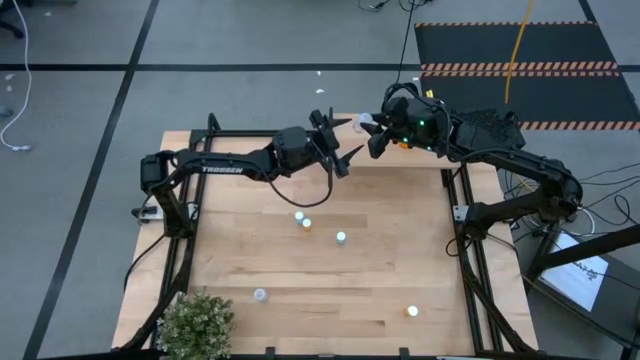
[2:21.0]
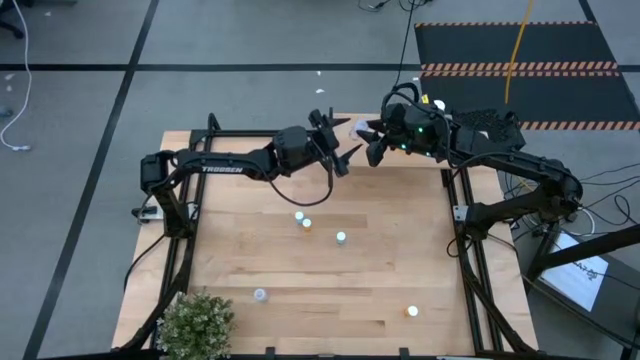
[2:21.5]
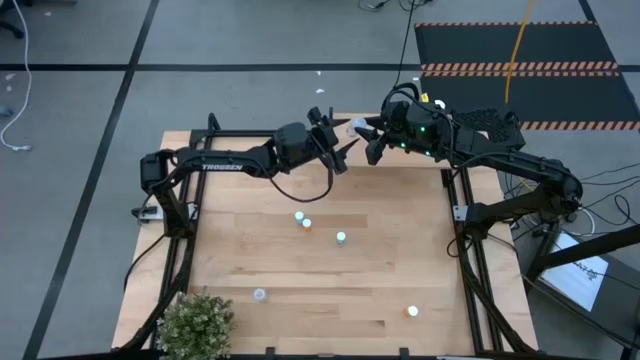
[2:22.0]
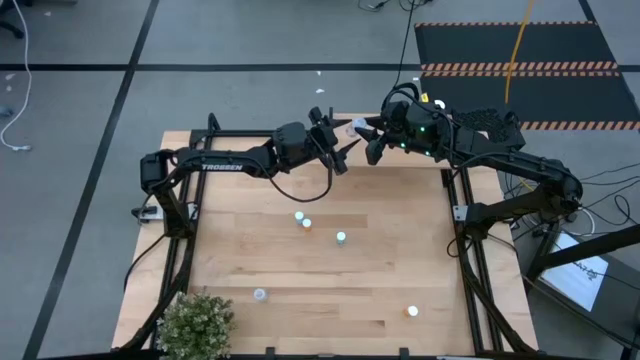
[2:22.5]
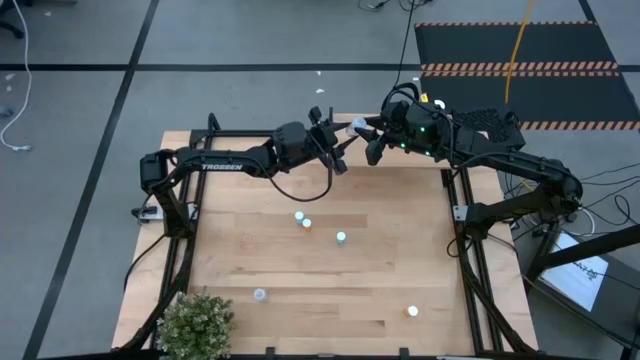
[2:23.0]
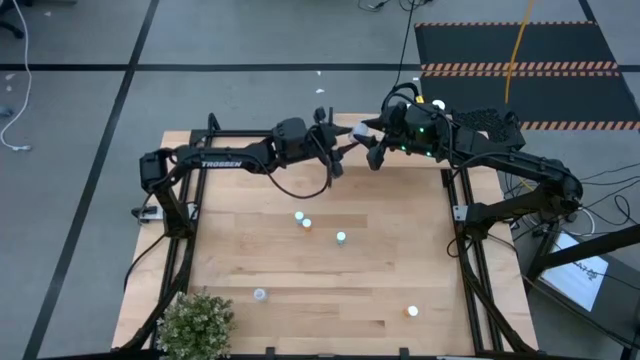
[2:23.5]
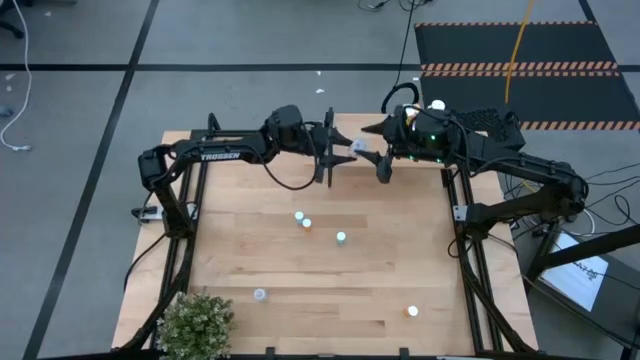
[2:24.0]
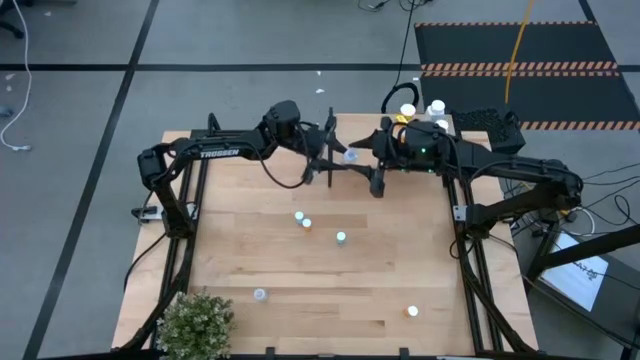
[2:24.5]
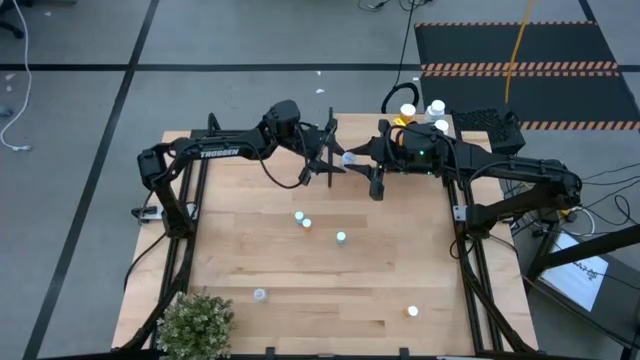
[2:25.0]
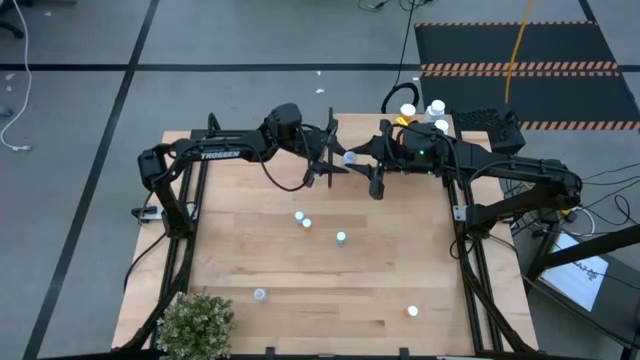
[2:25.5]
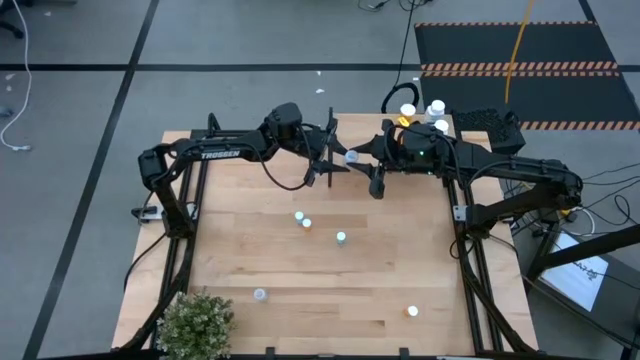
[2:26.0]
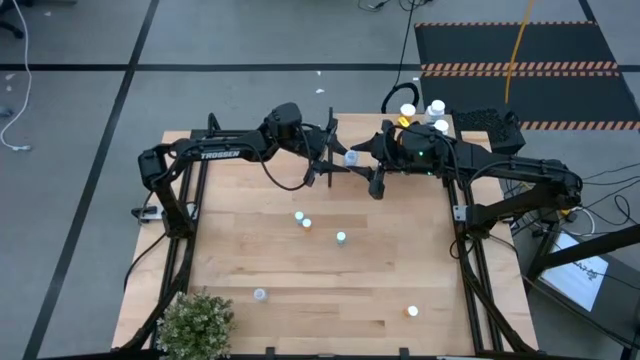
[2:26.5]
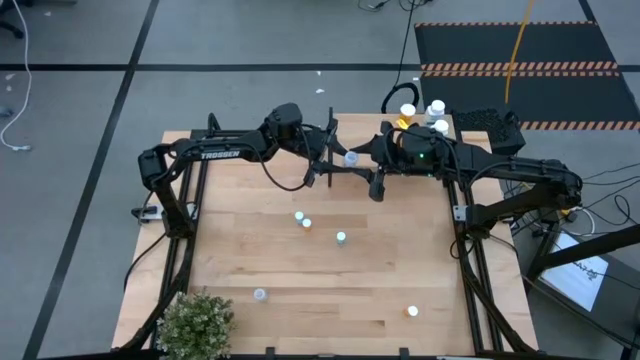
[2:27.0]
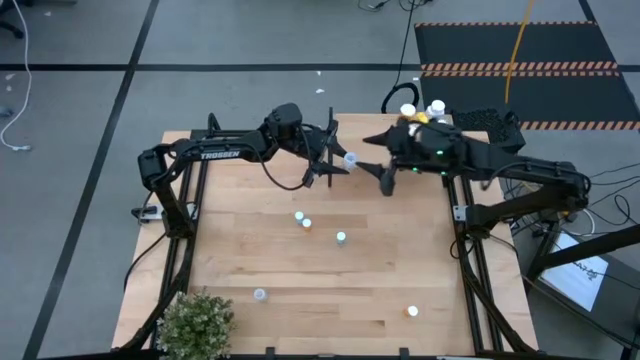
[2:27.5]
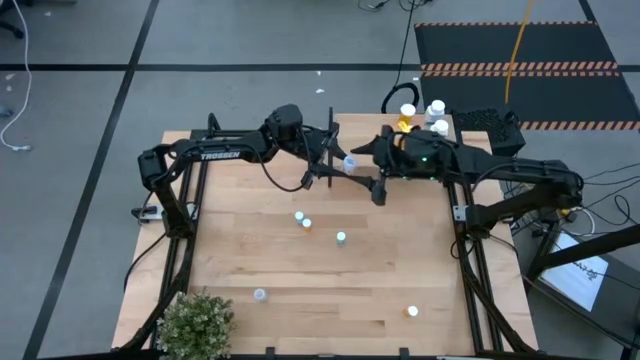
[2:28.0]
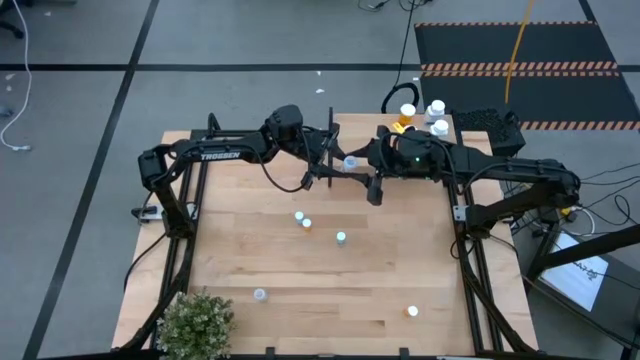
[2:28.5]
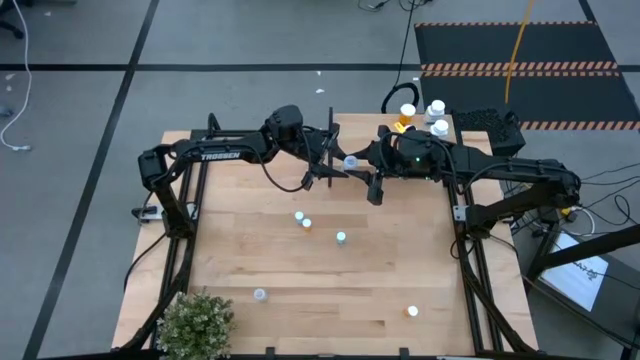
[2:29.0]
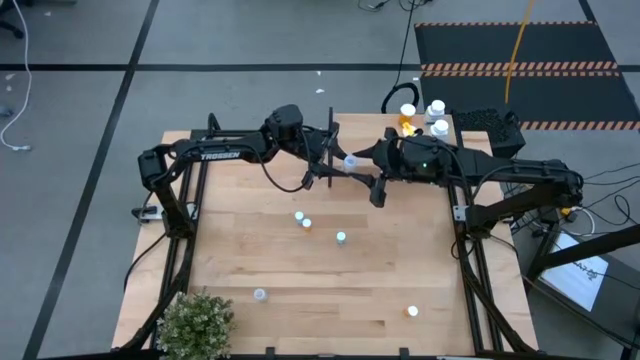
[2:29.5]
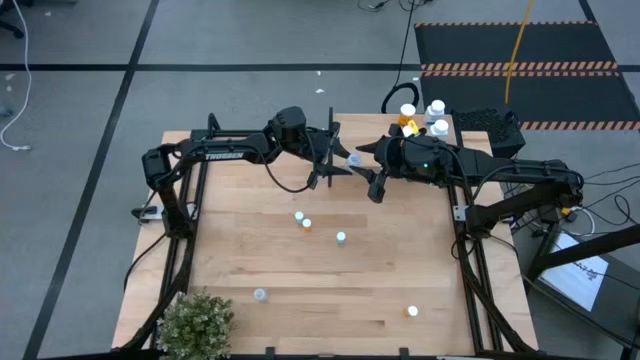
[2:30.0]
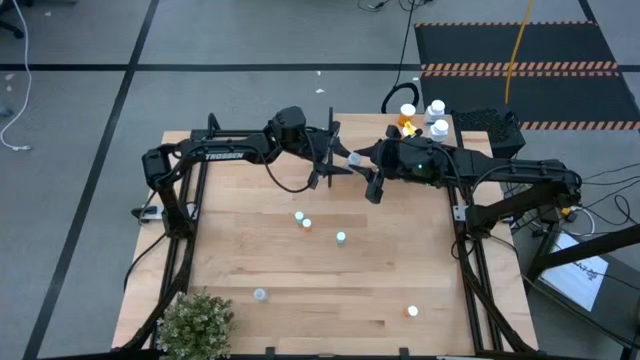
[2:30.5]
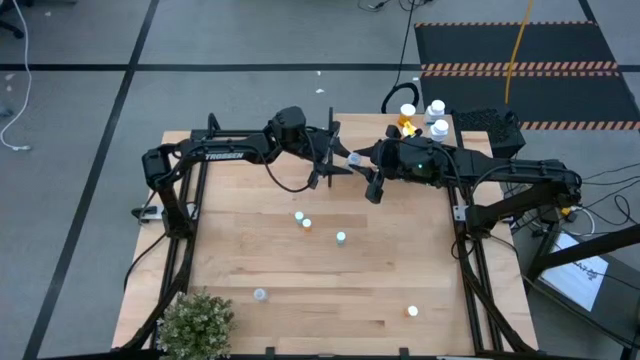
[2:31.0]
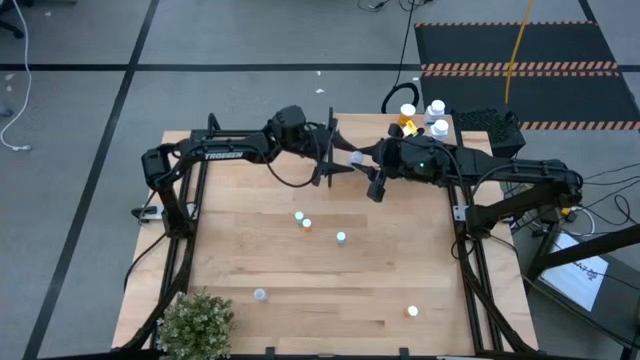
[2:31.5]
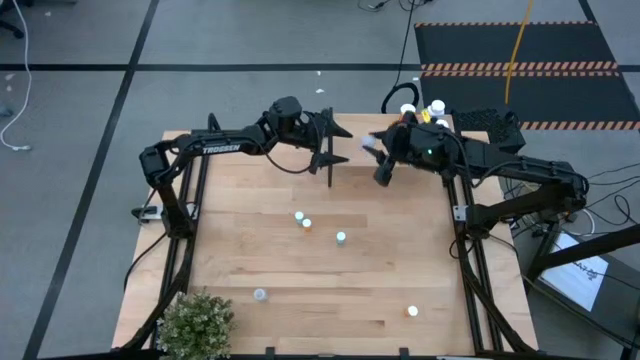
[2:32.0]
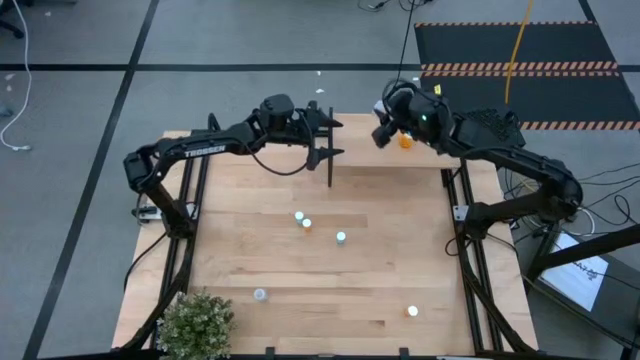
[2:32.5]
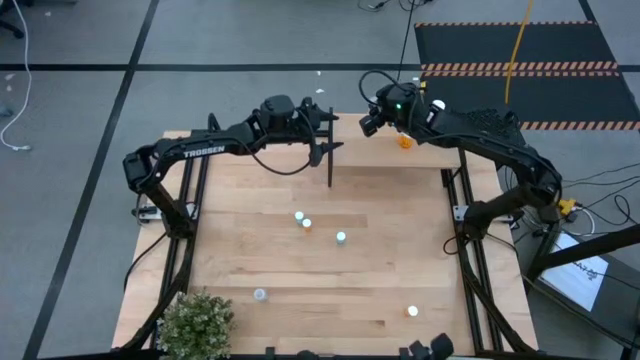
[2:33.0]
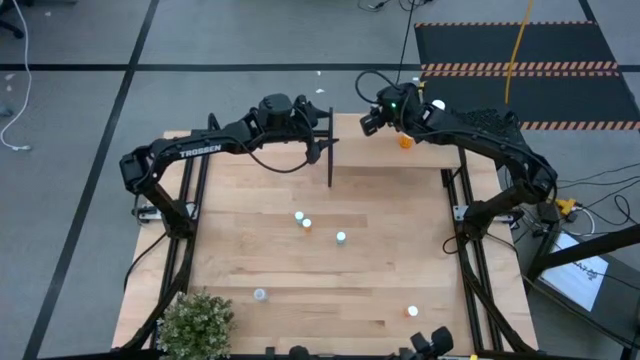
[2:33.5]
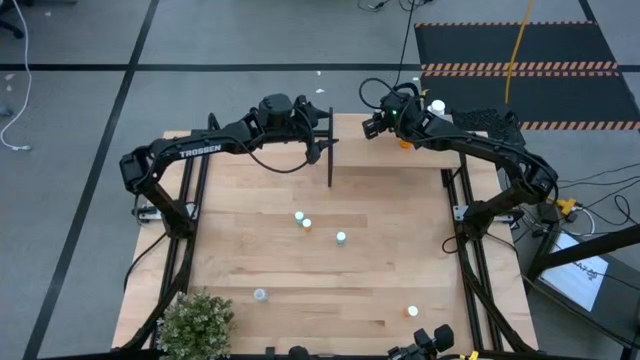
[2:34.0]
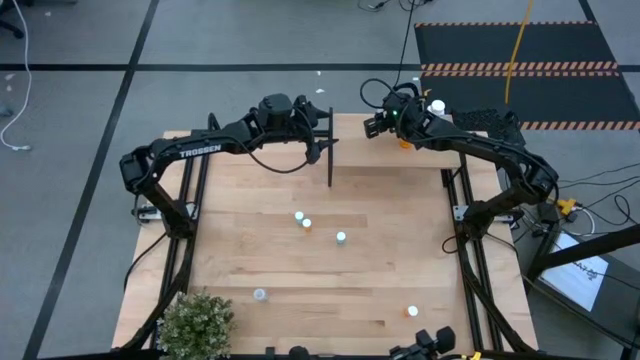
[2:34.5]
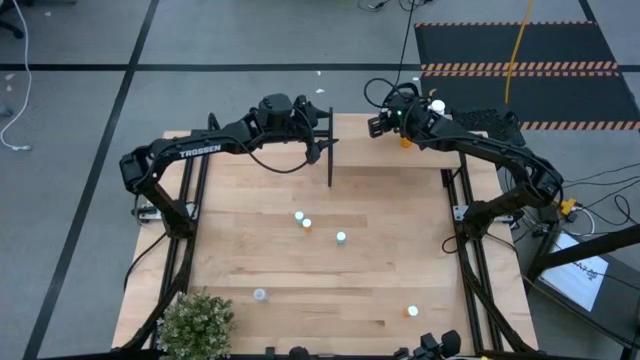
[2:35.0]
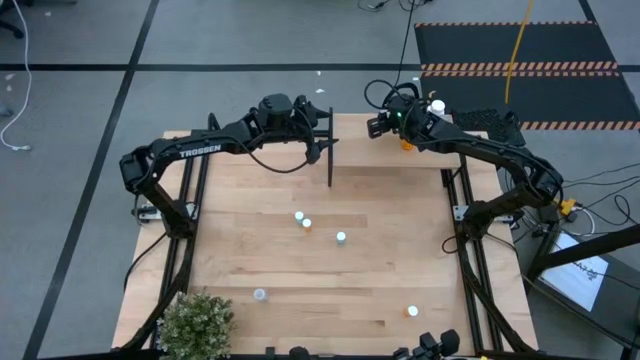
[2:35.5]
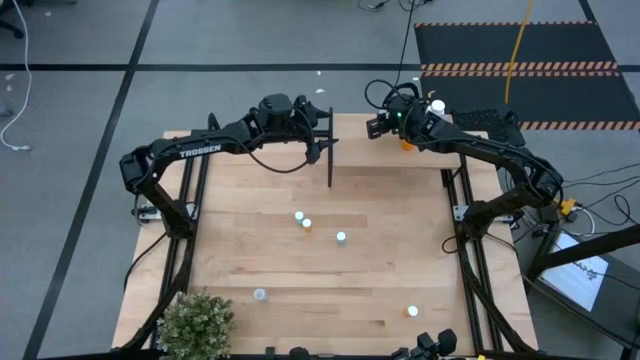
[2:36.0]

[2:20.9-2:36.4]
Task: Pick and place medicine bottles onto shelf by color
Put the top transparent pill bottle on the shelf

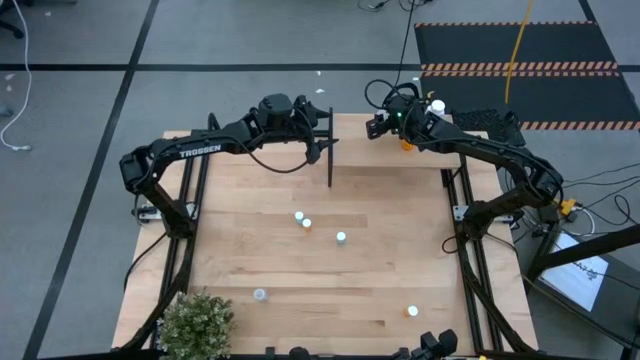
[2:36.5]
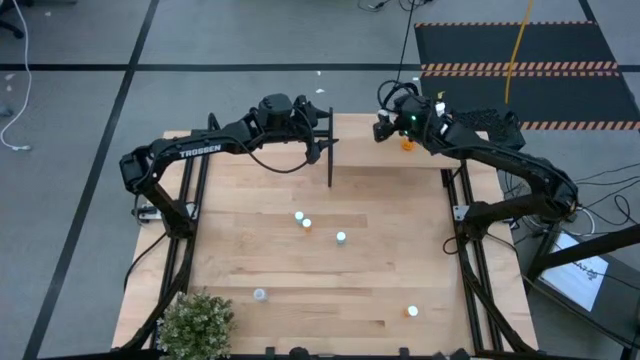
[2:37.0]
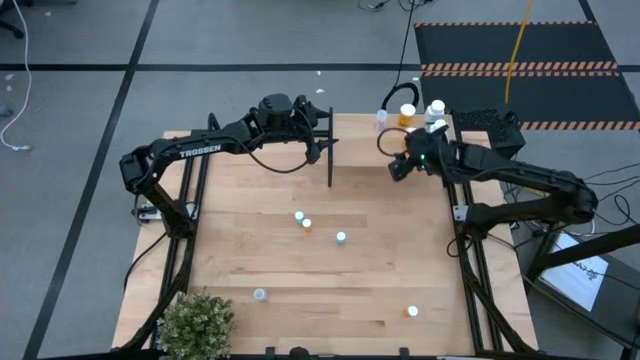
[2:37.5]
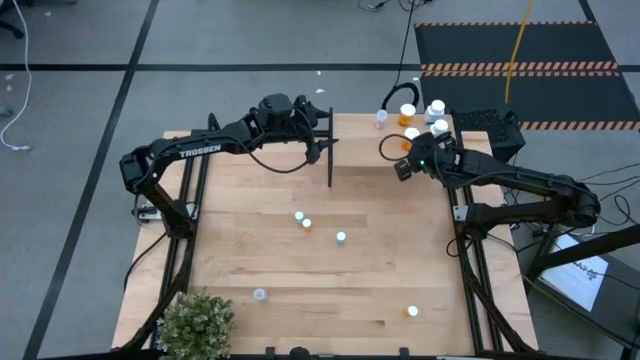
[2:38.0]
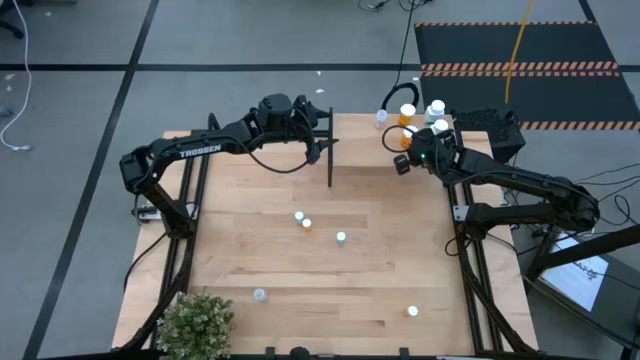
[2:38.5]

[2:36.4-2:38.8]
Adjust the large orange pill bottle on the shelf

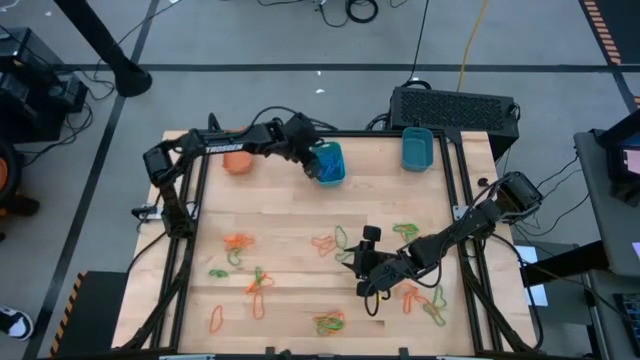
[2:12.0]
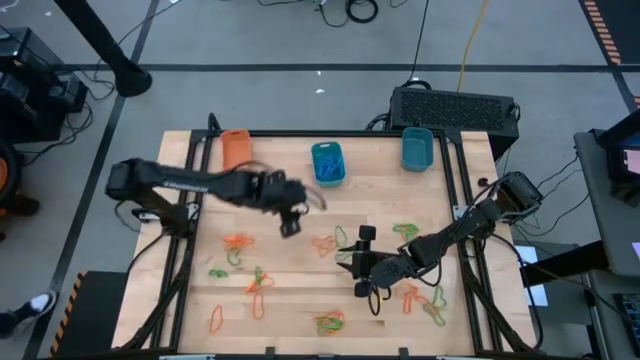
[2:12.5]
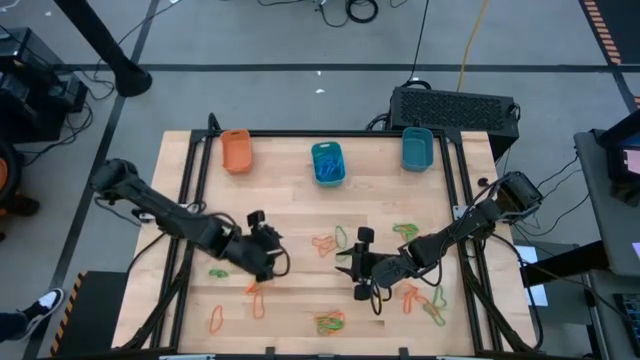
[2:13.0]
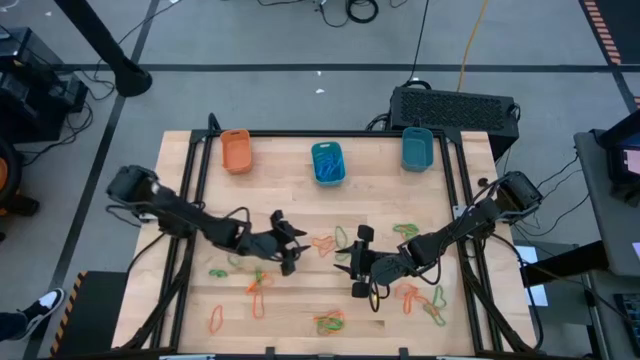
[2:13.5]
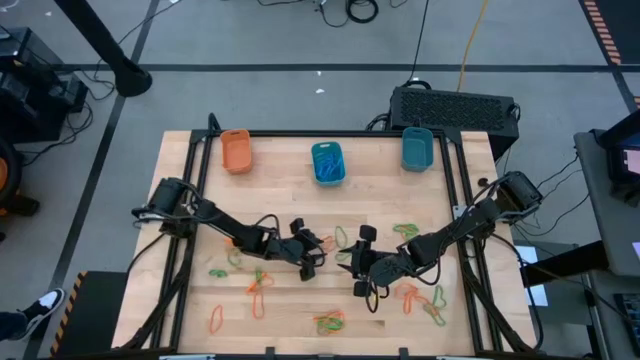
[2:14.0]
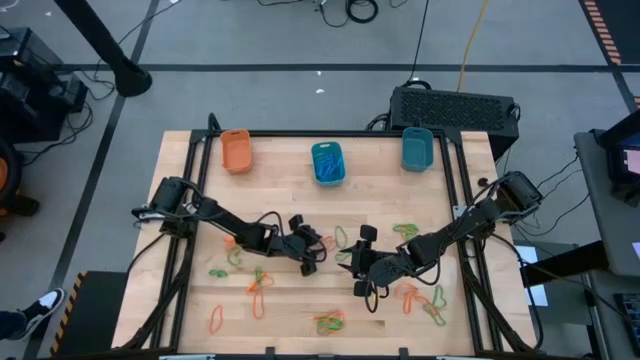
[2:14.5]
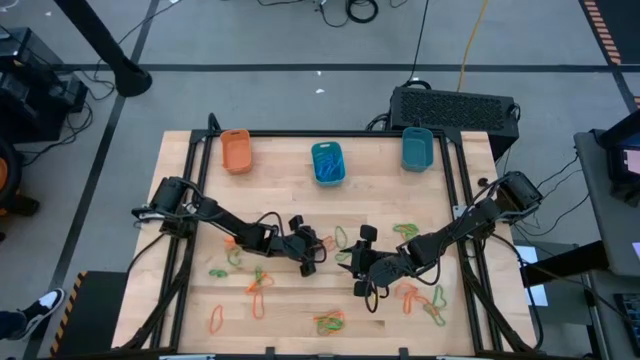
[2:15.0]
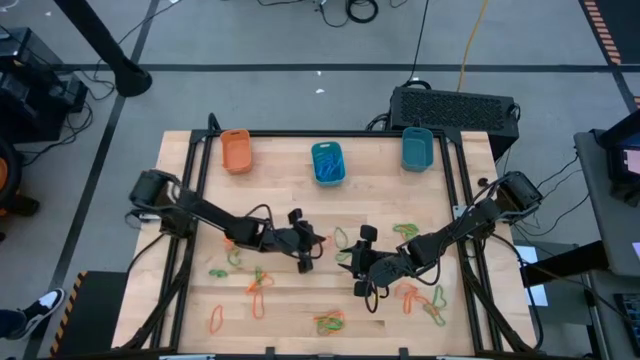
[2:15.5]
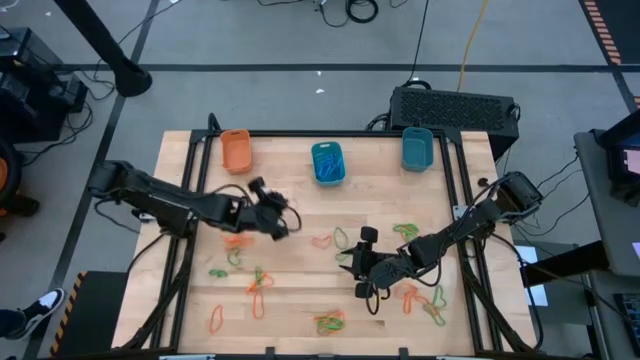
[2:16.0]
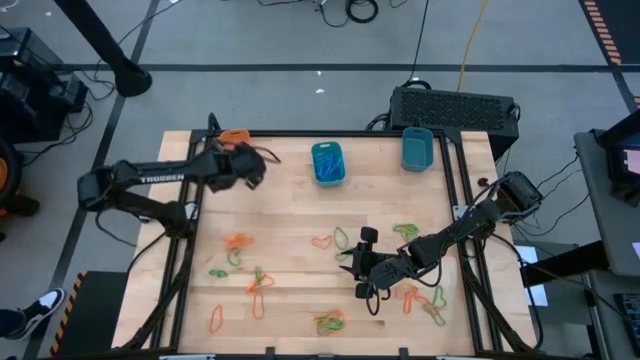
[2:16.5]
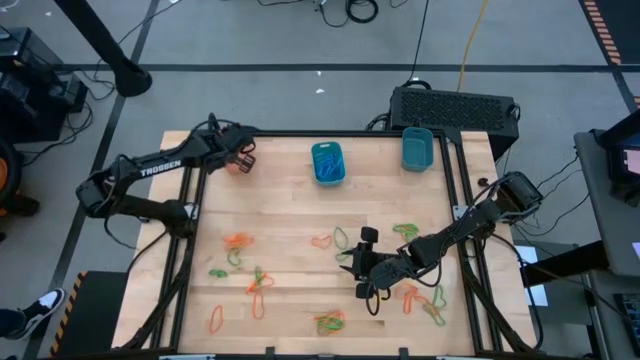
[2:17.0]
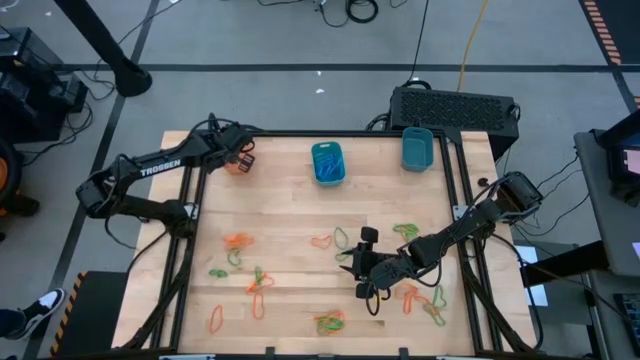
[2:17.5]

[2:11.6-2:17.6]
Task: Sort rubber bands into baskets
Put the orange rubber band into the orange bin
